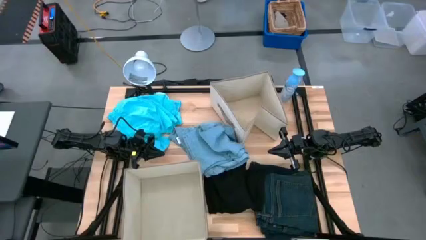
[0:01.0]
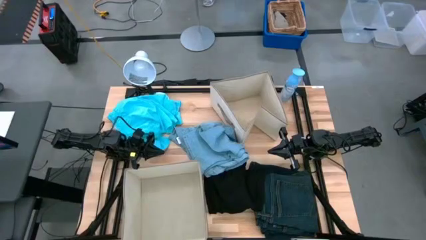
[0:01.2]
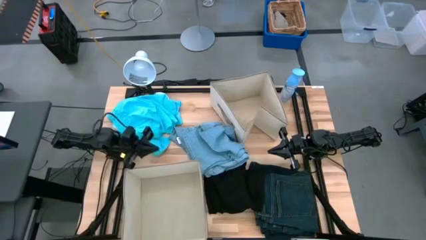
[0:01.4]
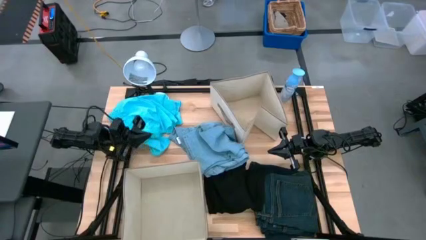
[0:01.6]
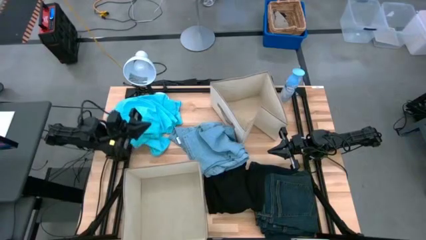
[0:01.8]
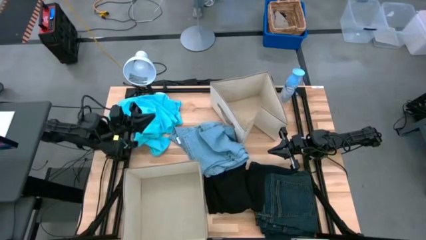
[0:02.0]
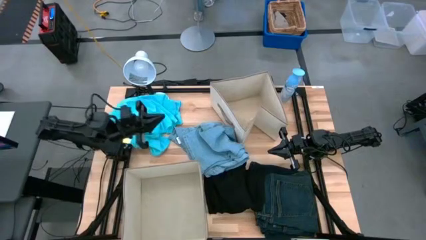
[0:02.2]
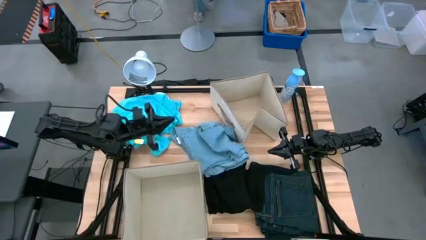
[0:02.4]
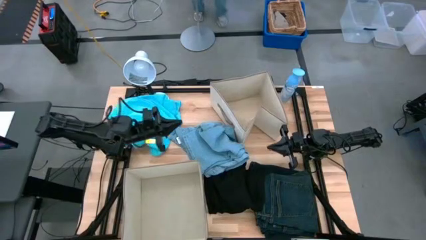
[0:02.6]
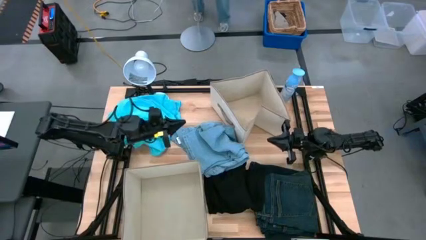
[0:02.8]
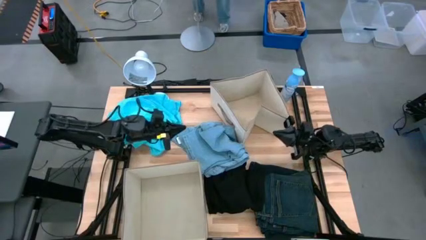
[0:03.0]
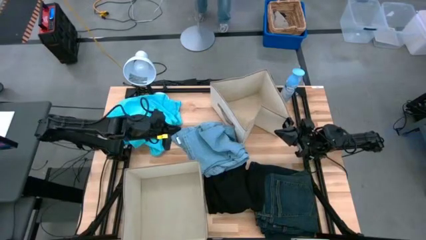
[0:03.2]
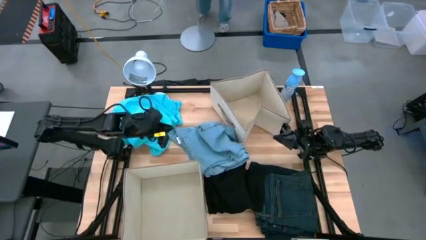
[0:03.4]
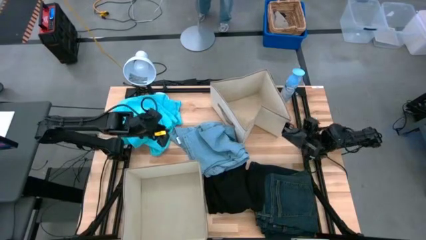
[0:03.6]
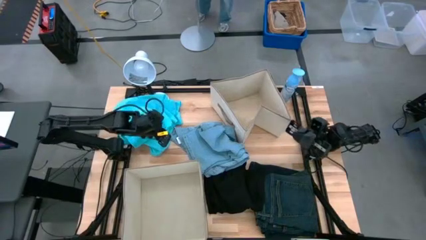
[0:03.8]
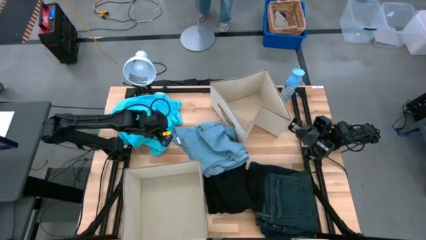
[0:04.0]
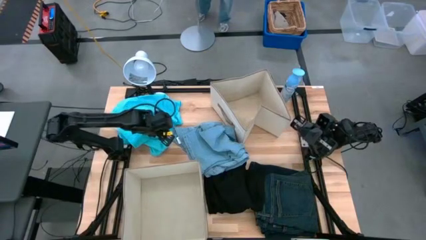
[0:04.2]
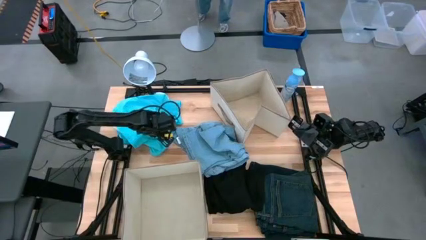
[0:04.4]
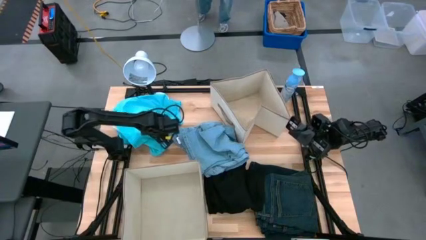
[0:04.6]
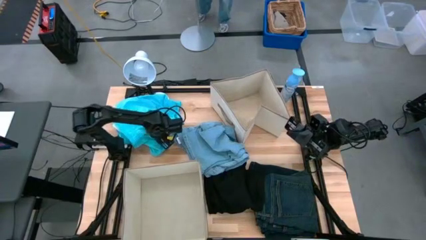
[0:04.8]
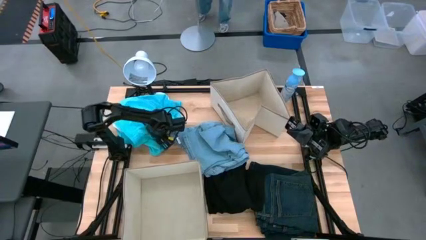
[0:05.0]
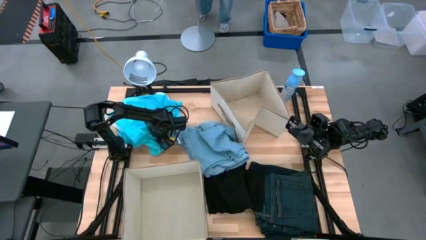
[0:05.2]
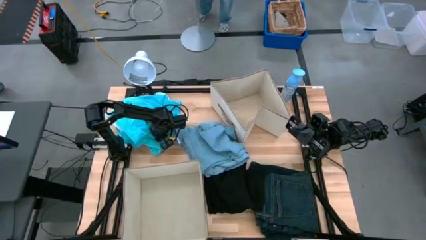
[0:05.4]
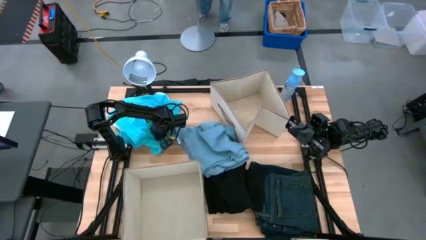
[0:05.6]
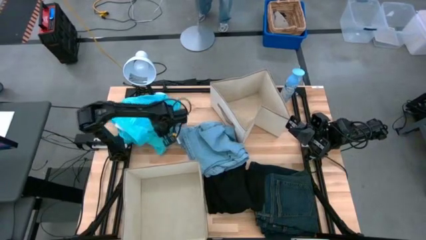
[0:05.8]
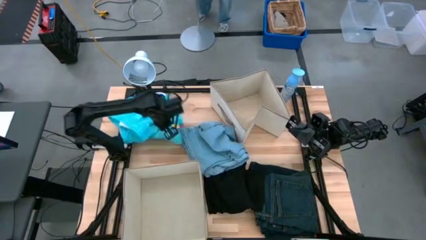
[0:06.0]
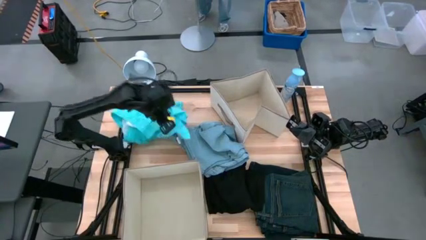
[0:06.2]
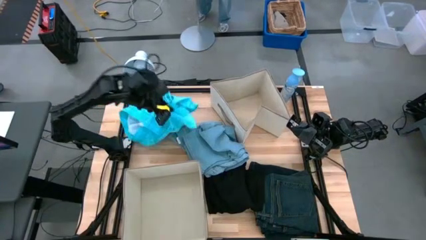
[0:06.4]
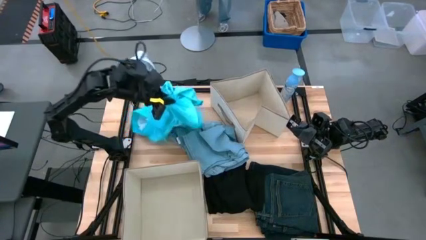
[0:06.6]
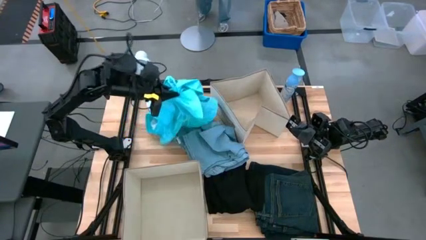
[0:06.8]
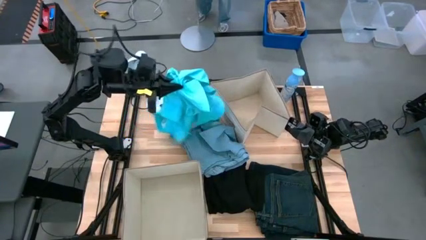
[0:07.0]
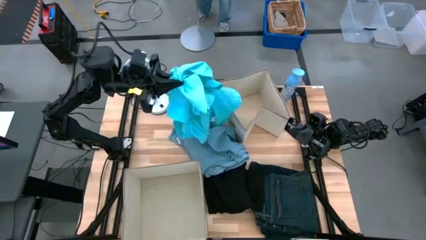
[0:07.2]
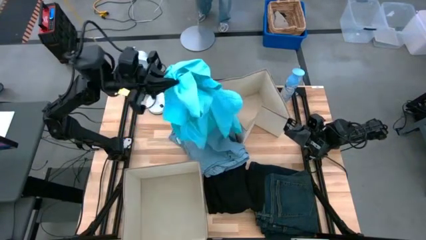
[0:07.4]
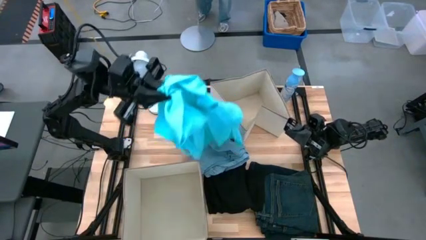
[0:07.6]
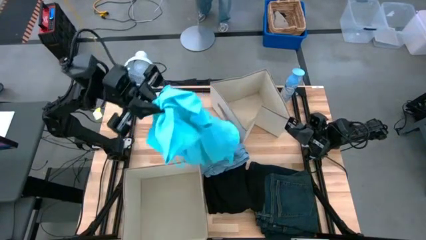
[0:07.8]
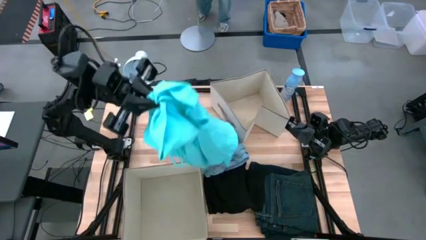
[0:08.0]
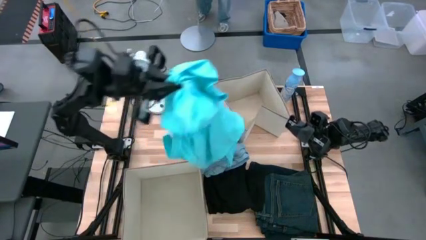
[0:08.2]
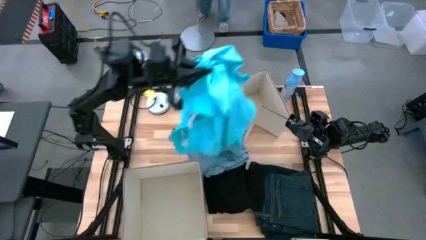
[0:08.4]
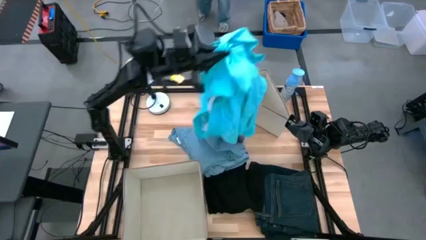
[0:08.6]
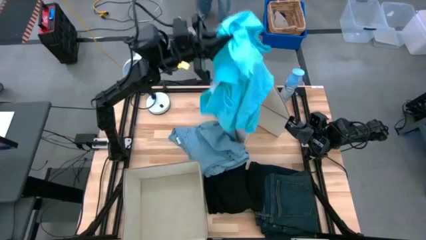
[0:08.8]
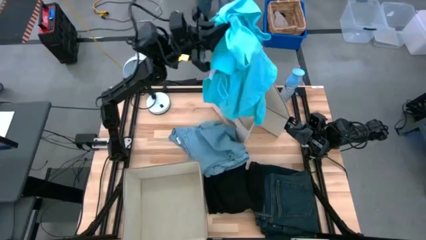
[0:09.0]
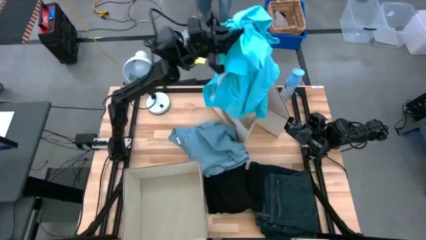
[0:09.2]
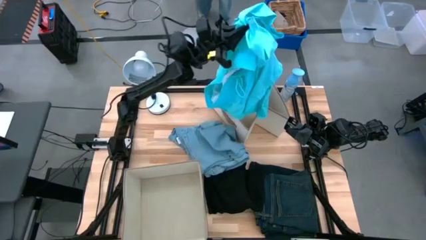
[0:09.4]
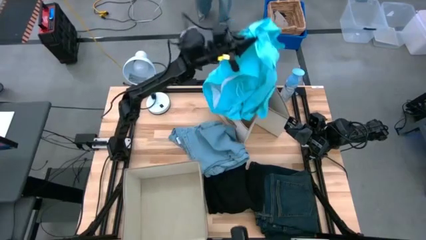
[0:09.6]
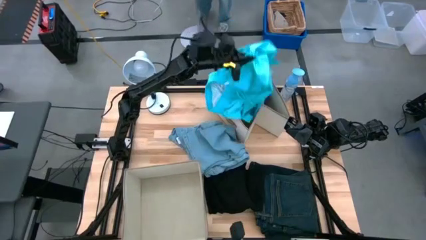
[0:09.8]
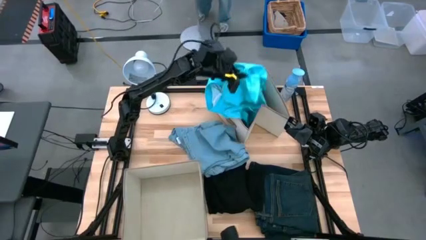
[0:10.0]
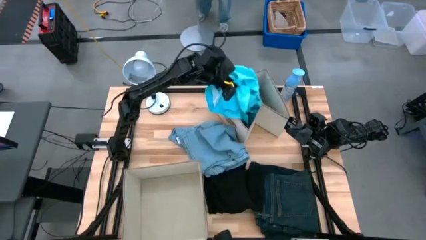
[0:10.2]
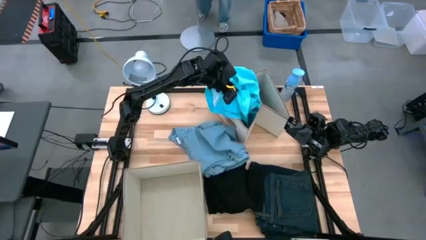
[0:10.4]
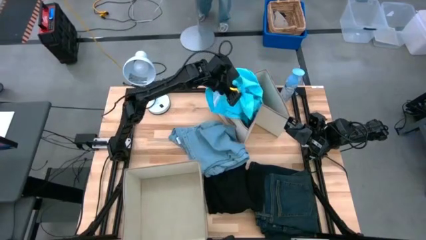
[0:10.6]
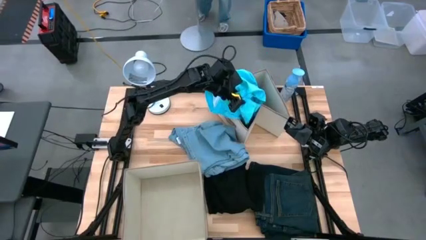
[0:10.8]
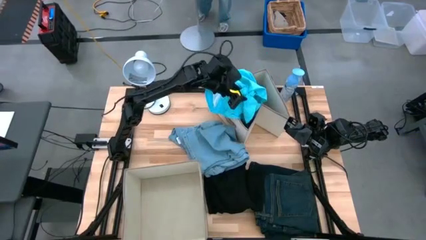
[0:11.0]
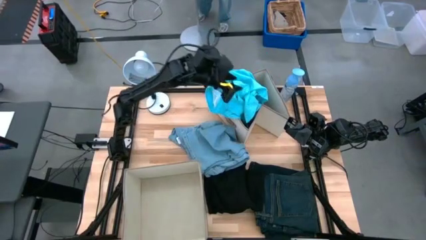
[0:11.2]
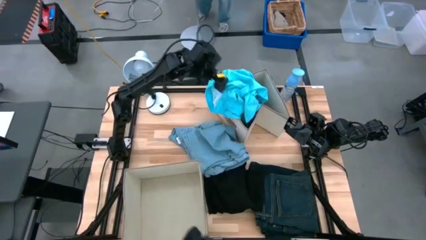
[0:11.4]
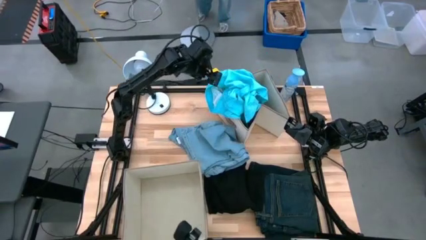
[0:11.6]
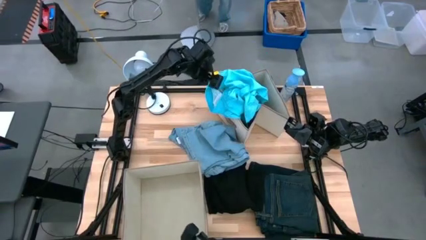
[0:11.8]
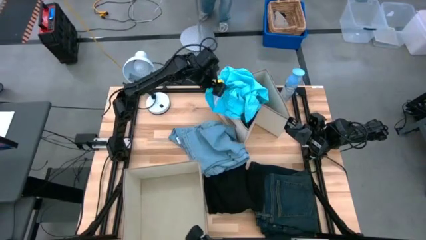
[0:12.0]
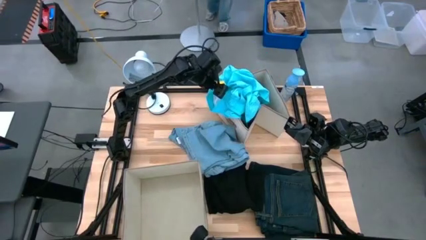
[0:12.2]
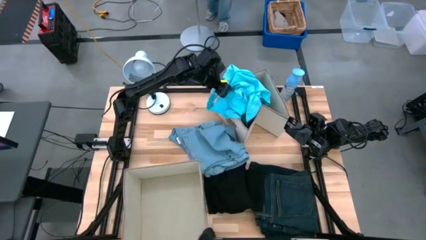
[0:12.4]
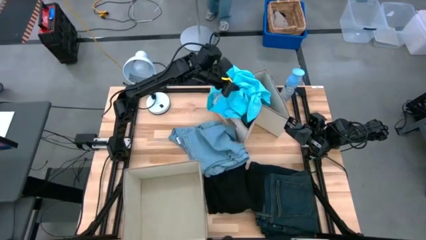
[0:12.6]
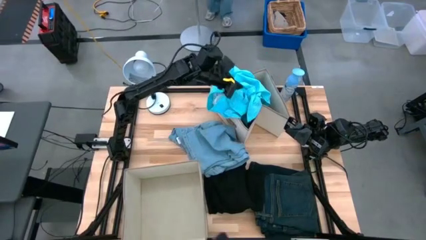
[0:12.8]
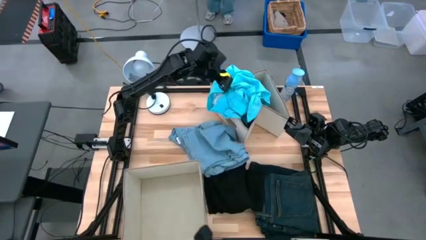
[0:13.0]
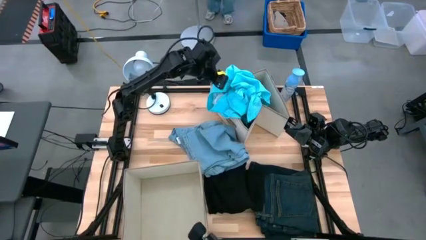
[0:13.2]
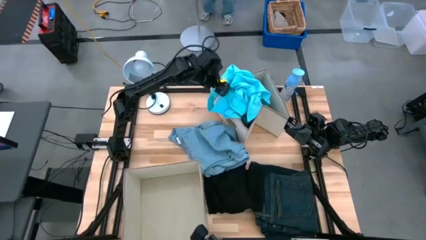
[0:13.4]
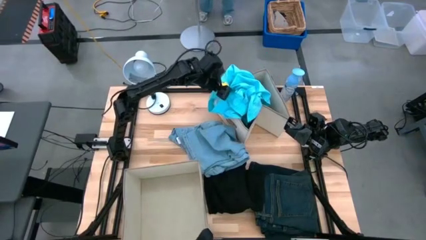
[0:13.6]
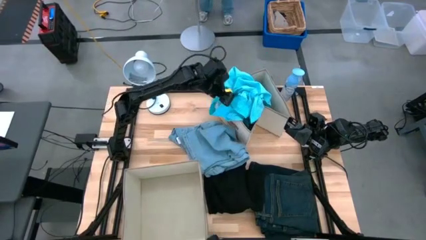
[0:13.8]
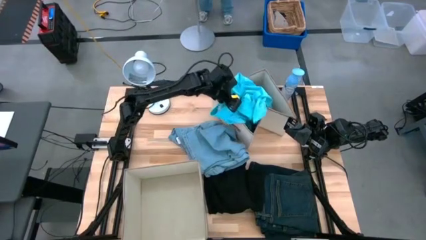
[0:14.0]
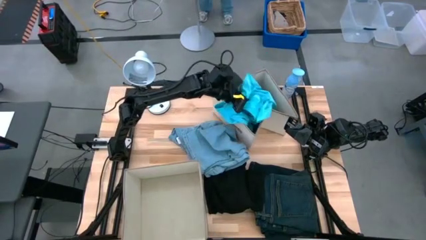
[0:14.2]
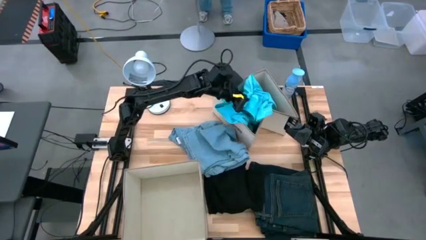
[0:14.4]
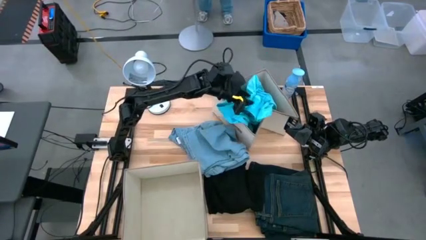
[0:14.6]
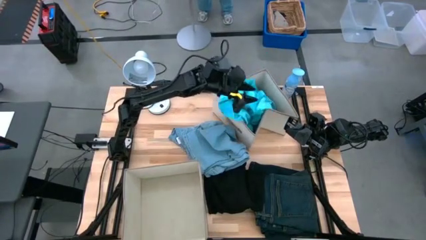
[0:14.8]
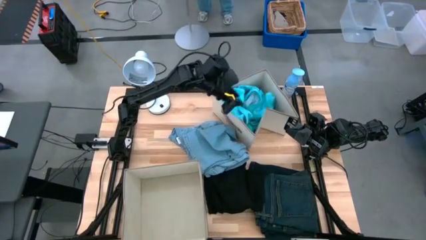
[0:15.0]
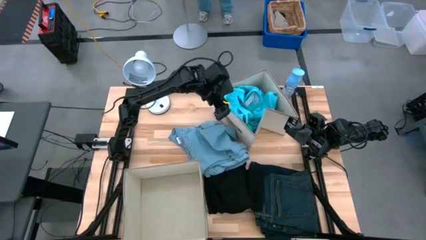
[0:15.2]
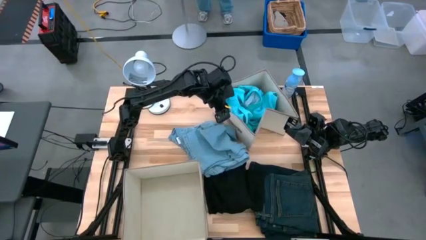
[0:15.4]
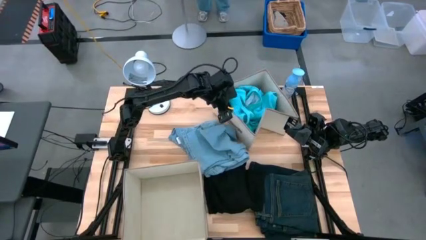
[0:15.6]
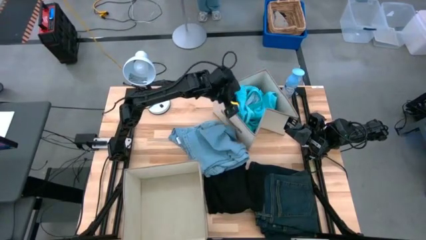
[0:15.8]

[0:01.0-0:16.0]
Task: Sort clothes
Put the blue shirt into the top laundry organizer
